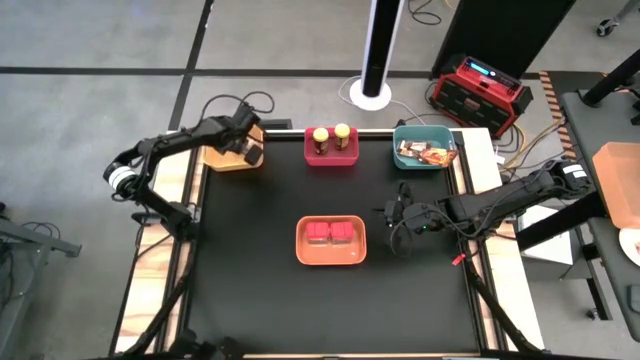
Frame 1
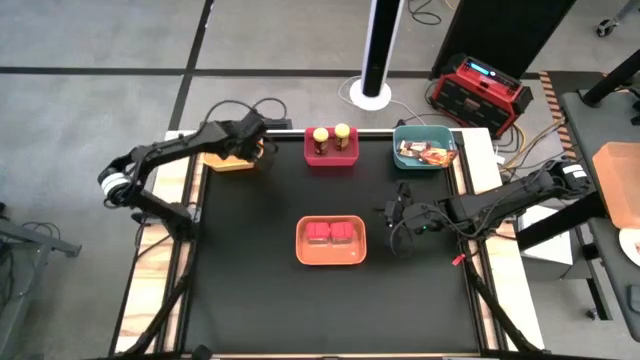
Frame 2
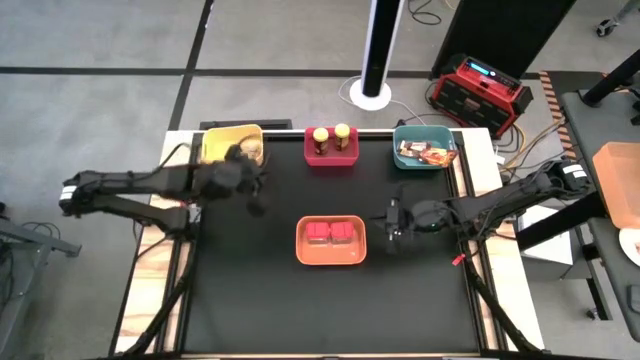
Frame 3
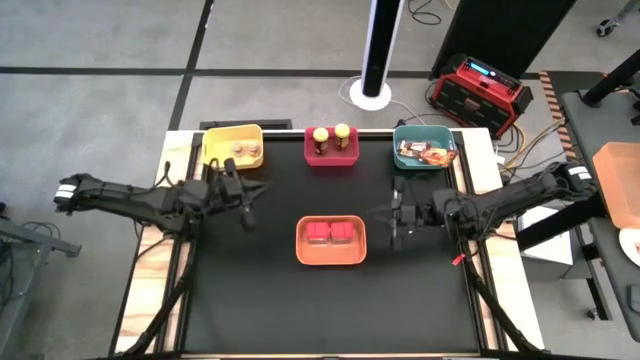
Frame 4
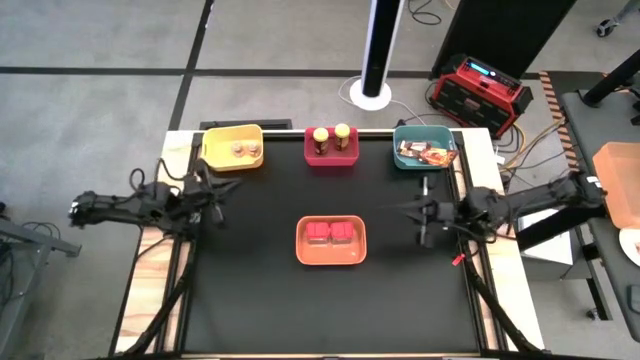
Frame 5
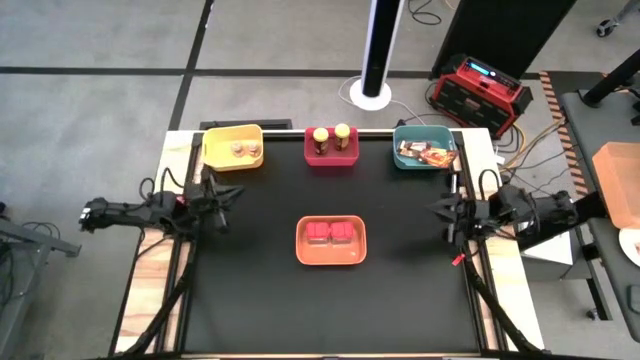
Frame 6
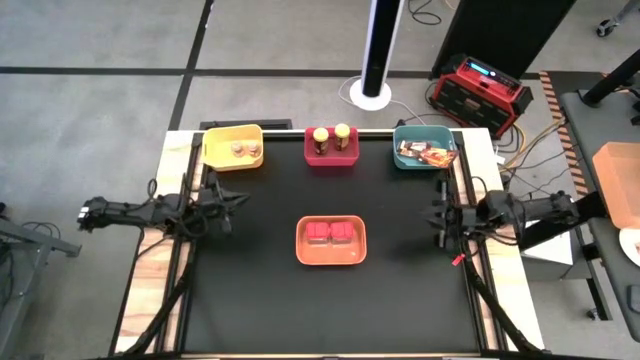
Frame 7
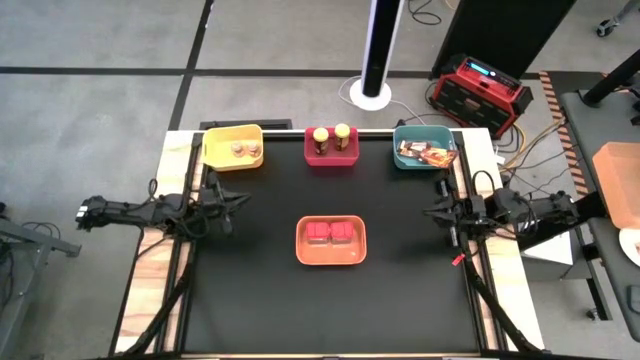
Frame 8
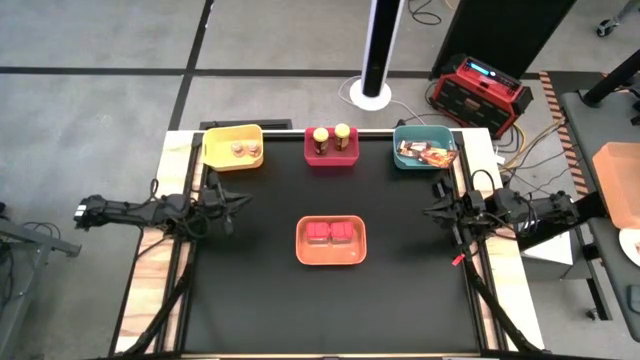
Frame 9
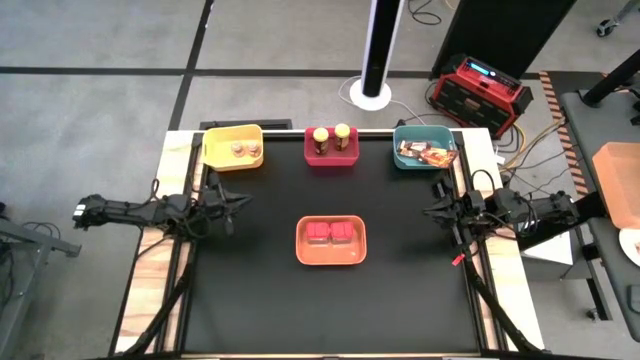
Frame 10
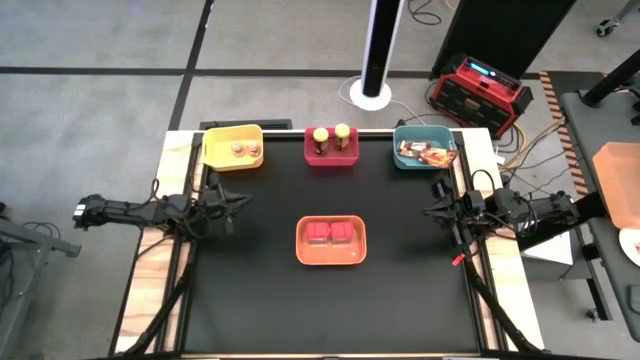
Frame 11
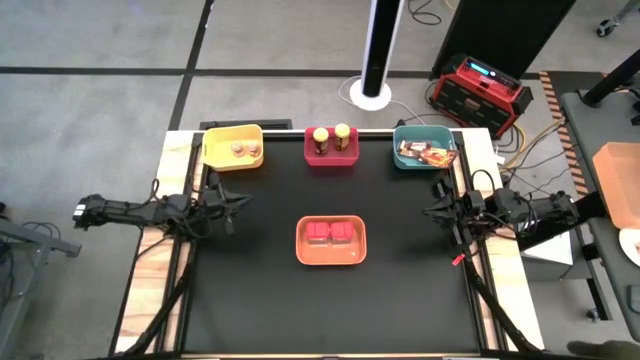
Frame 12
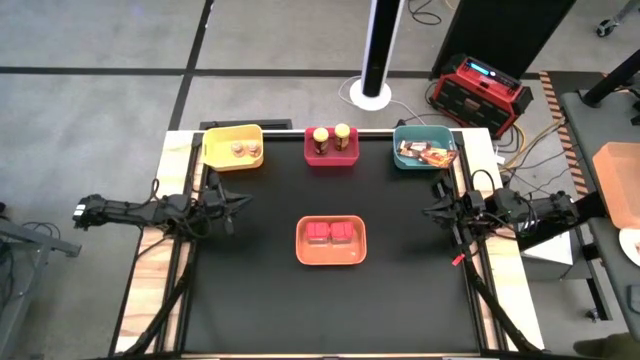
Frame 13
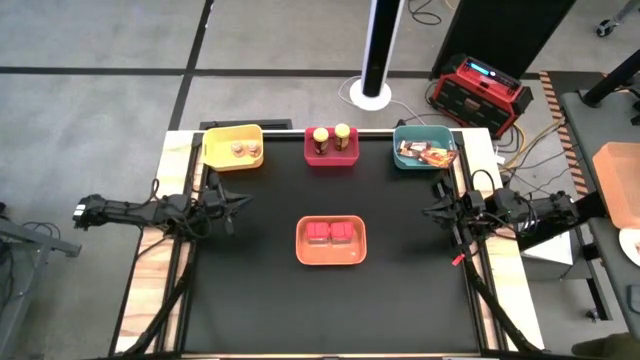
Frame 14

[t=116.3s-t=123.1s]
Task: Sort spices by type
Return to Home Position

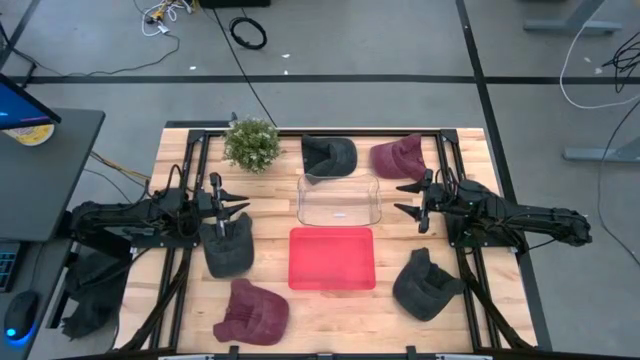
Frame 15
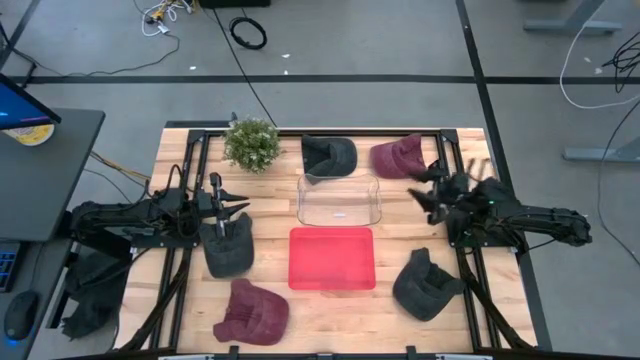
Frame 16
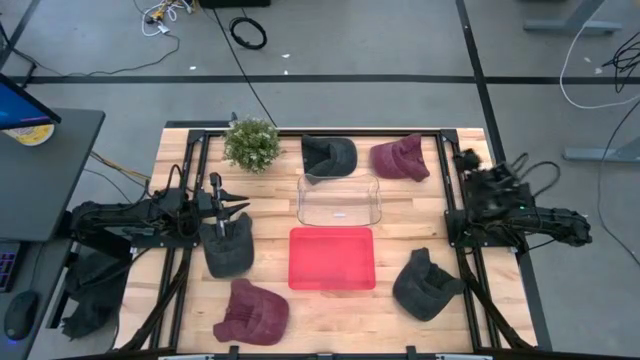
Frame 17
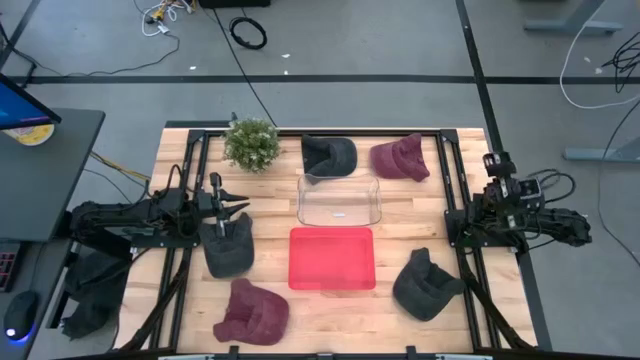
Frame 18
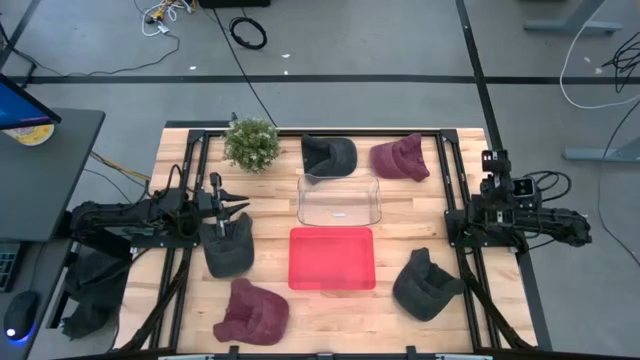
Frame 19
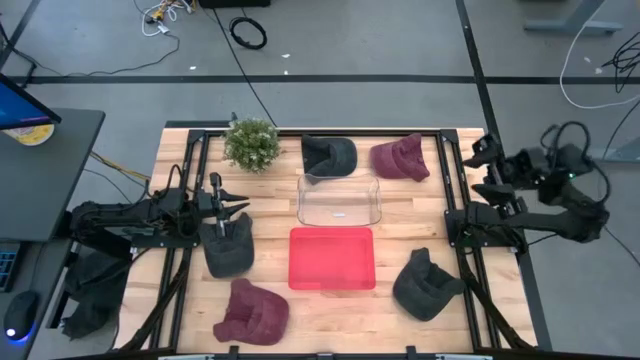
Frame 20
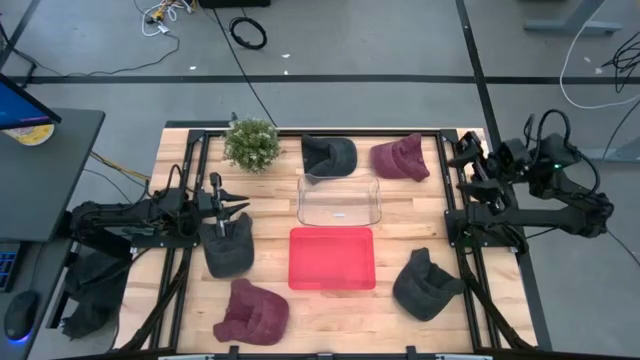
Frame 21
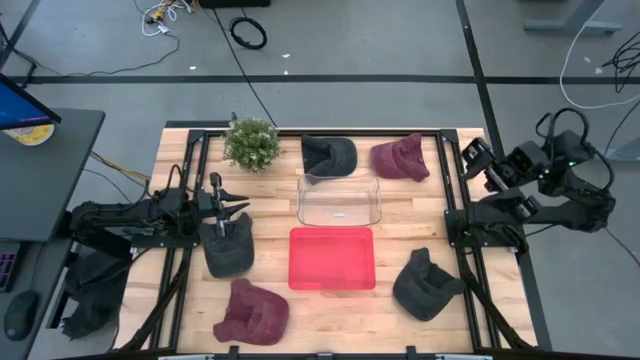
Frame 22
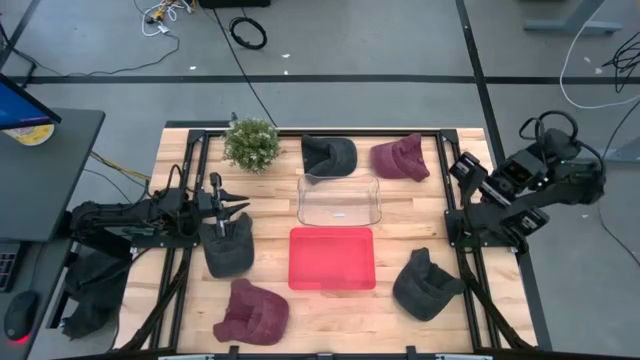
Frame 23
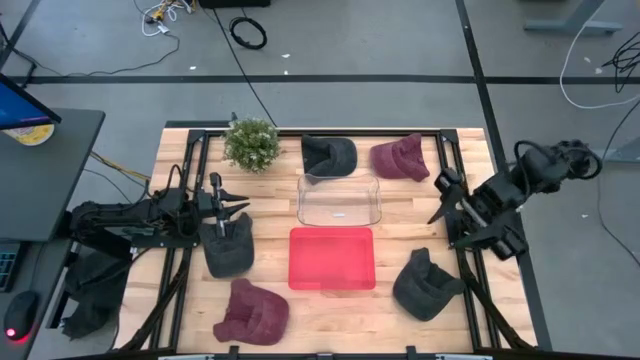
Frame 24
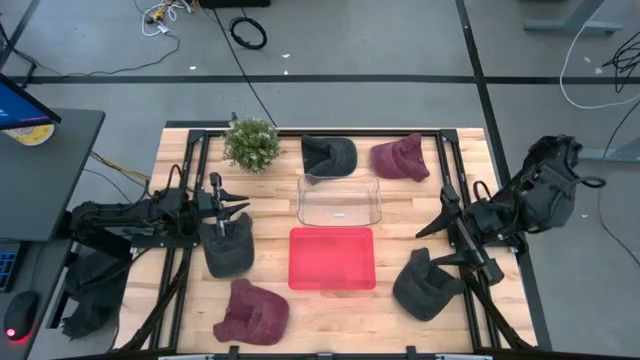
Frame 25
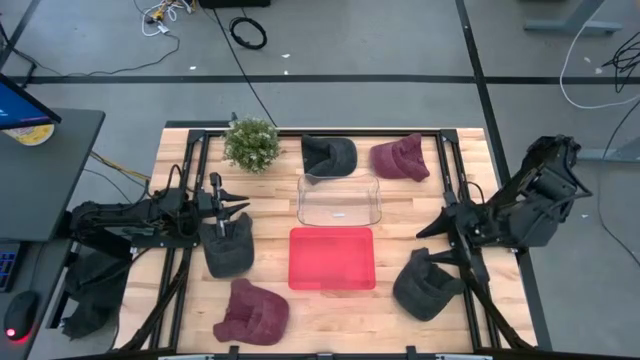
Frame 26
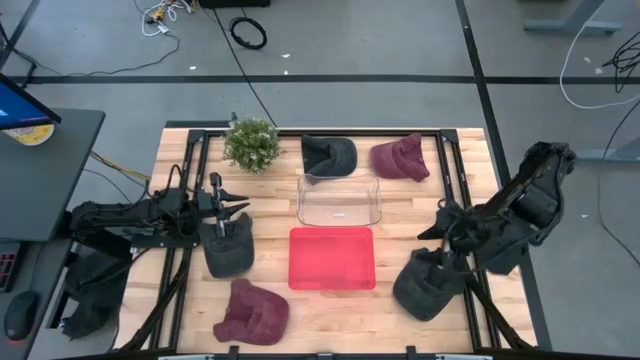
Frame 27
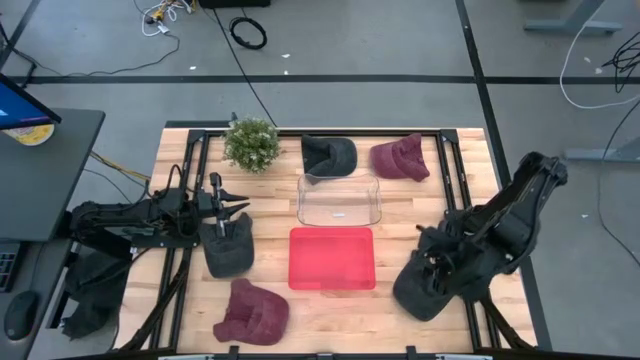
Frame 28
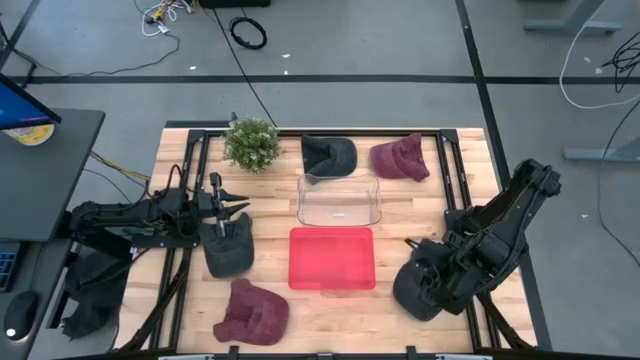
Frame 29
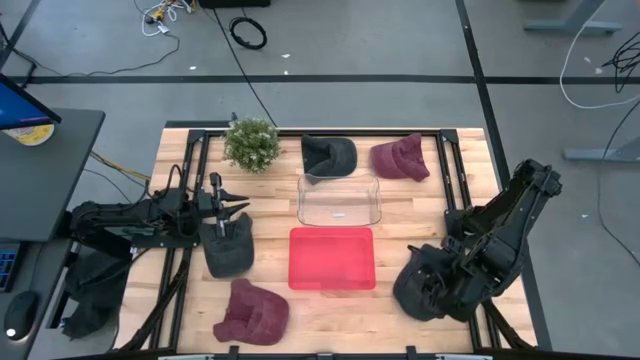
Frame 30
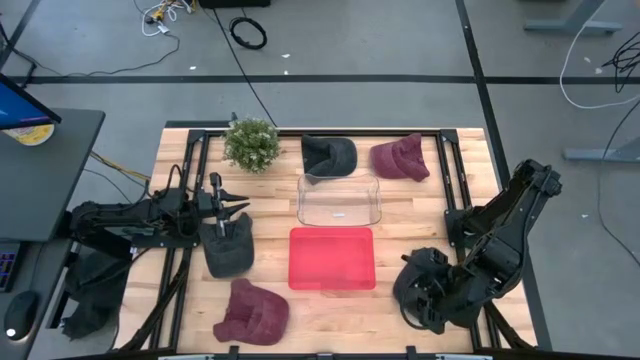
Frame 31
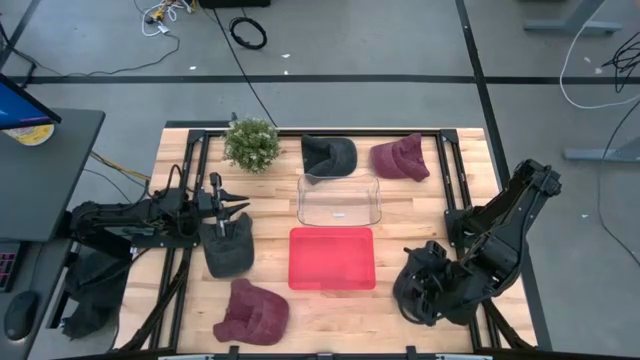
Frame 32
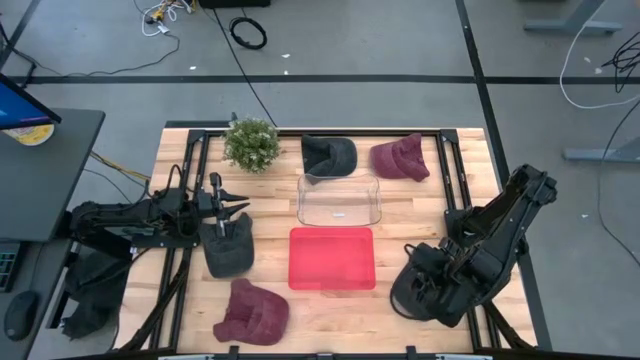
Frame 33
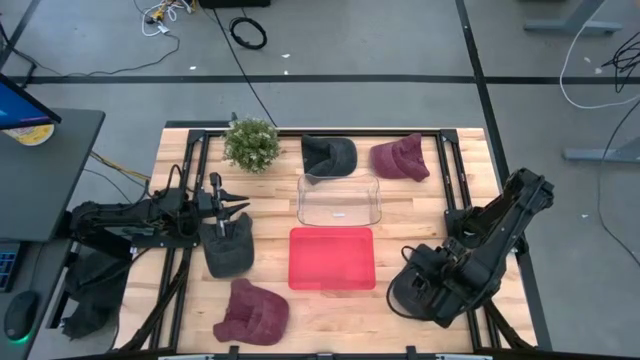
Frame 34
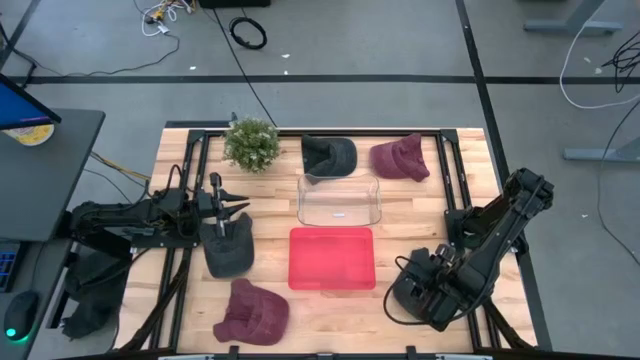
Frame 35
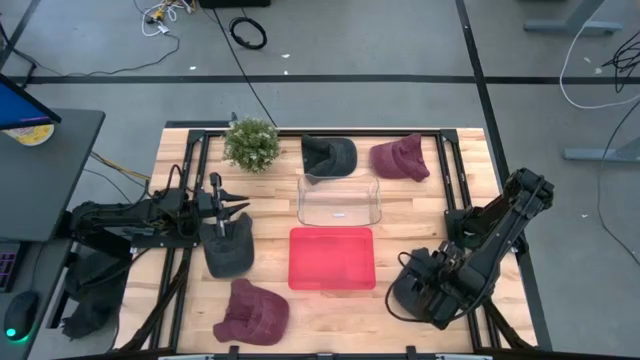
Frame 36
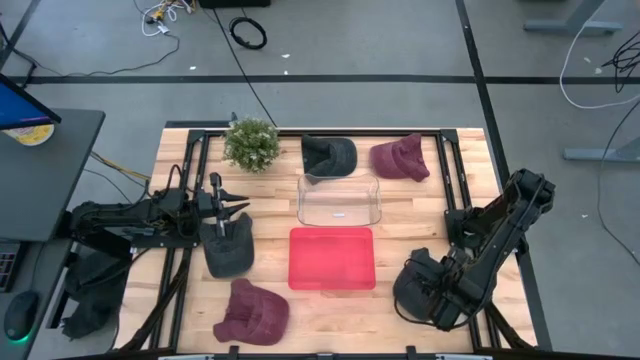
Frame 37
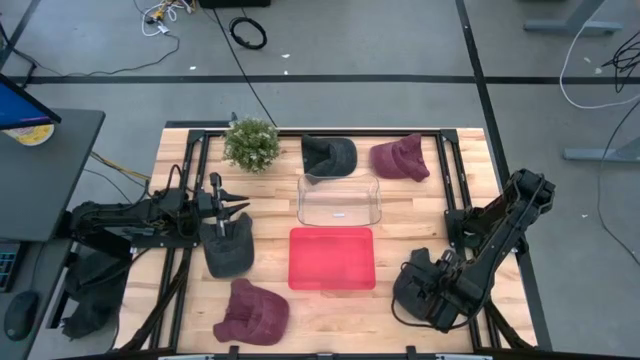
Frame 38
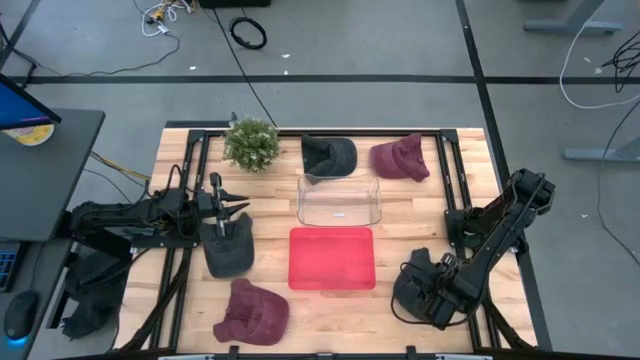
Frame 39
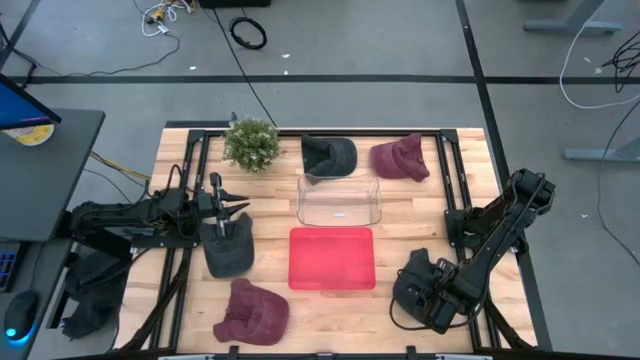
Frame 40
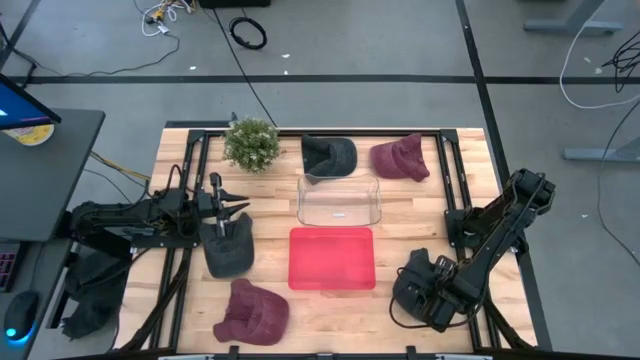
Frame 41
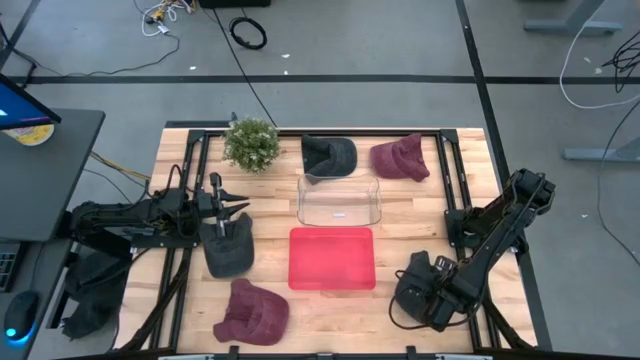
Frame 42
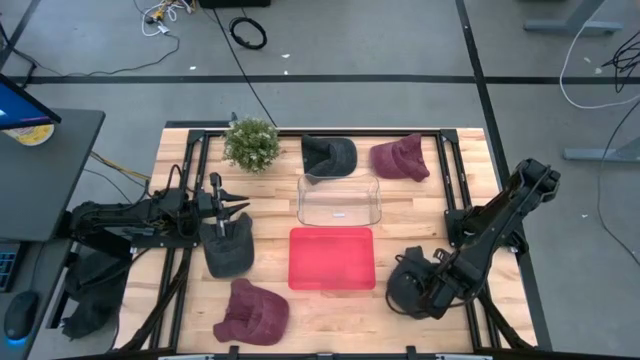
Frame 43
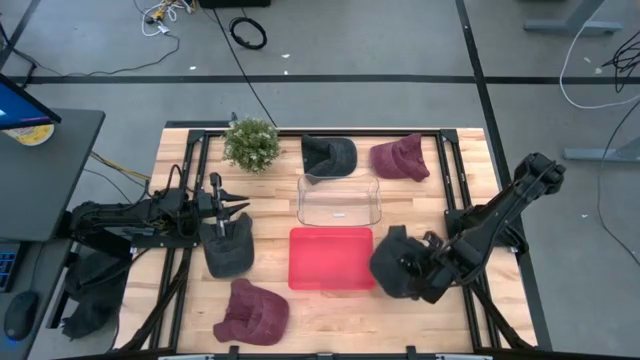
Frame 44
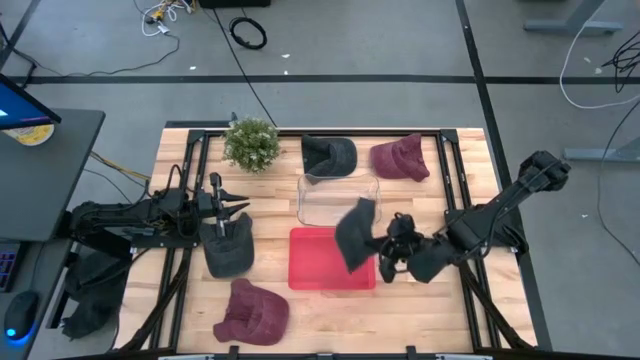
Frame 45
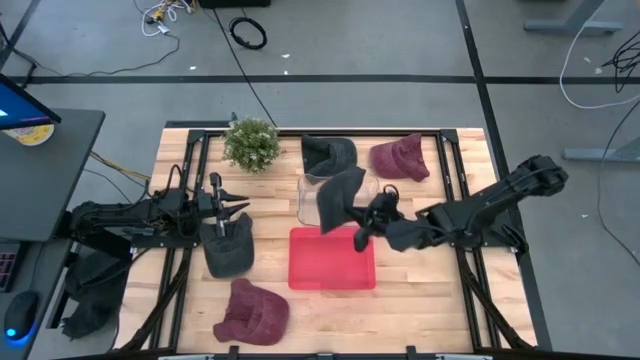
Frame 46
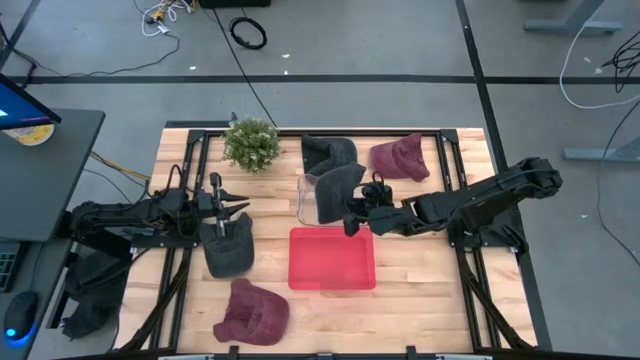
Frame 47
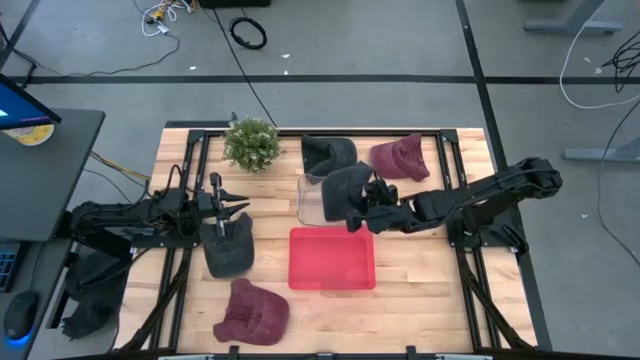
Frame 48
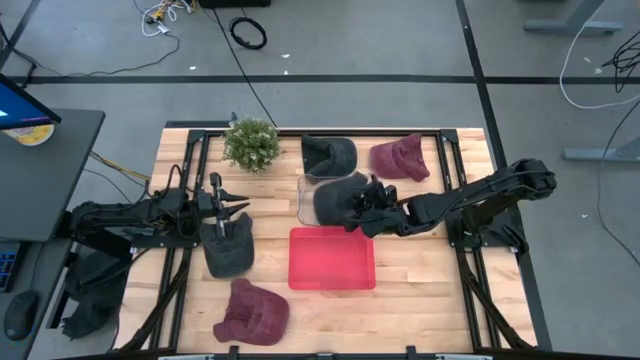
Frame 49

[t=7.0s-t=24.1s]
Task: Pick & Place hat
Put the bottom right black cap into the transparent bin
